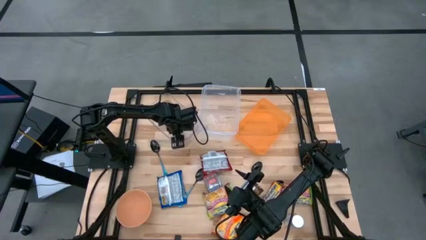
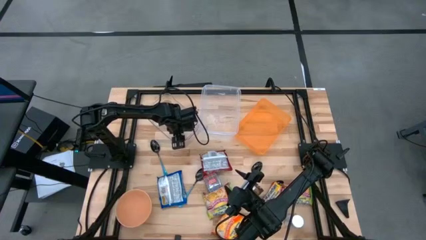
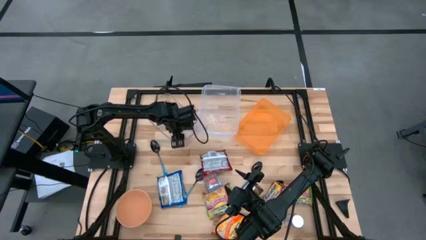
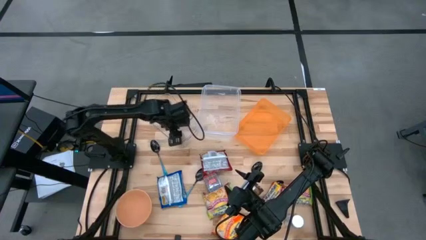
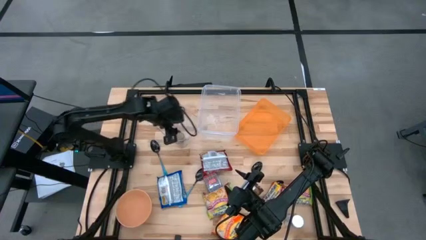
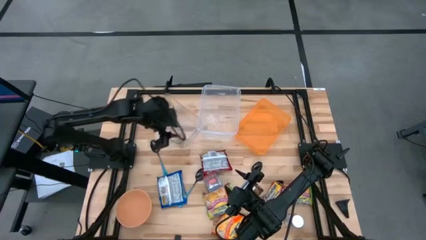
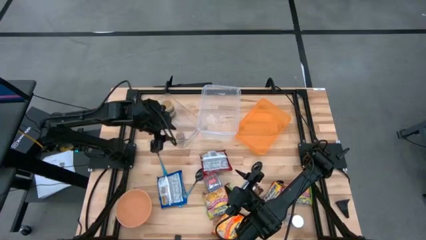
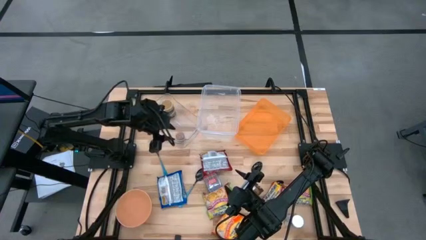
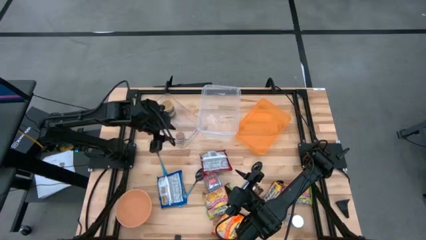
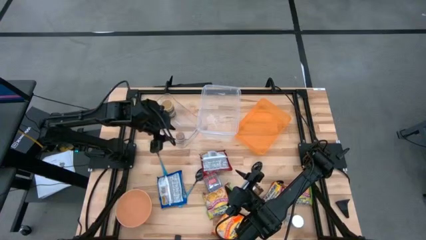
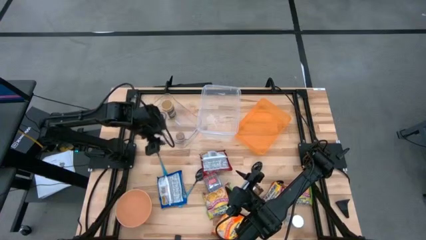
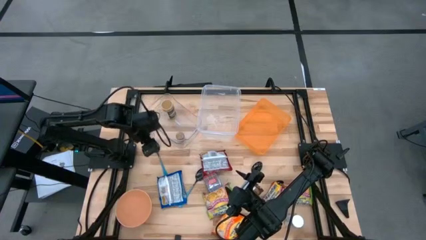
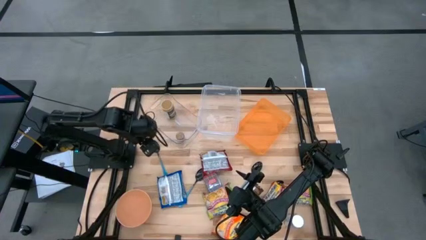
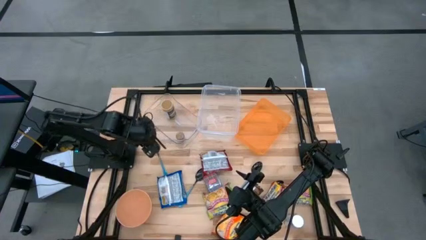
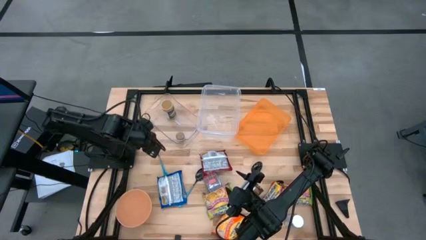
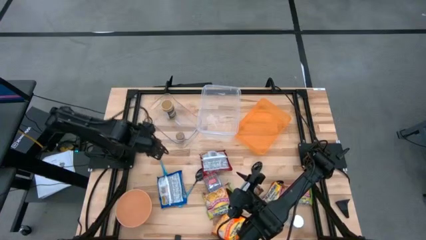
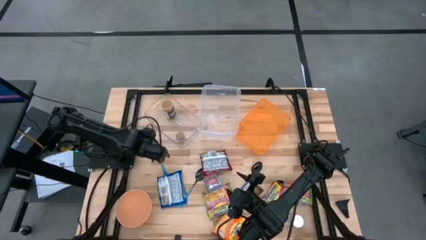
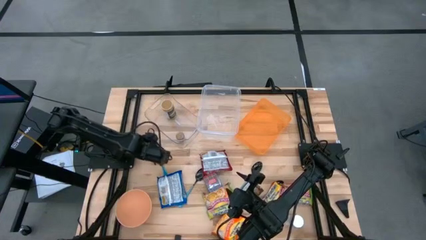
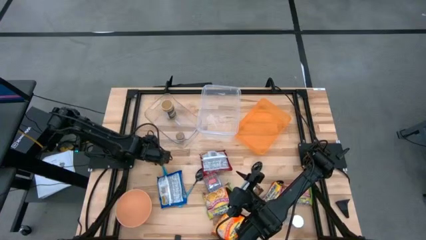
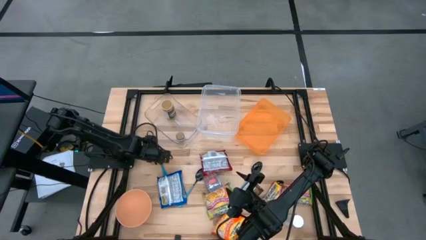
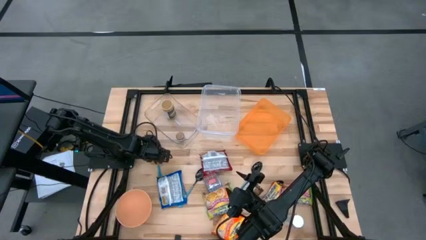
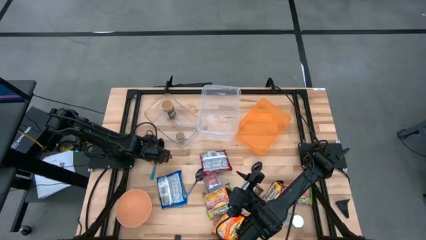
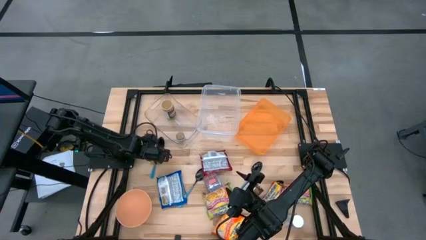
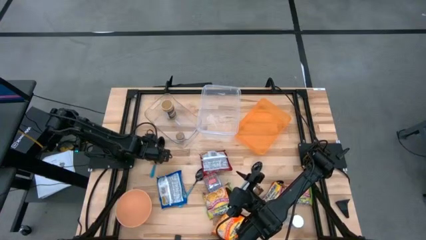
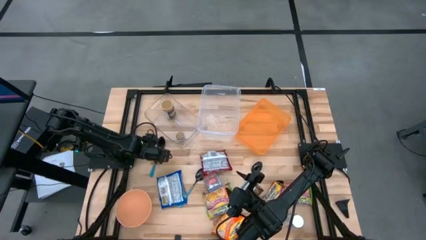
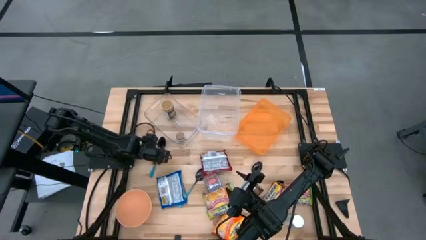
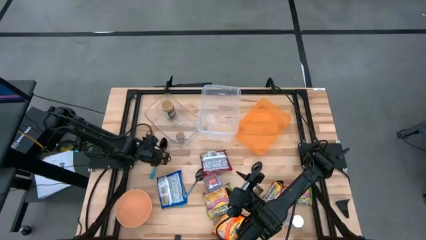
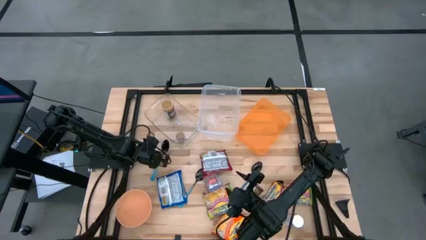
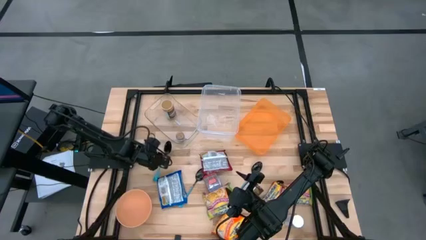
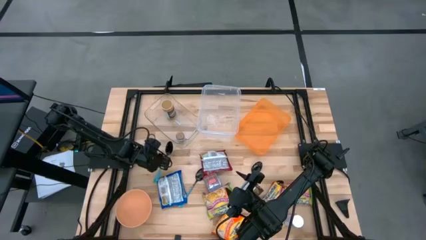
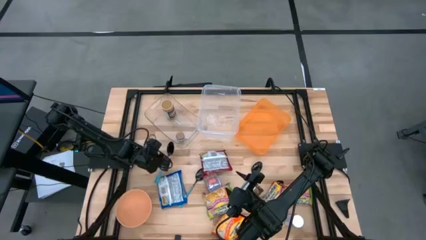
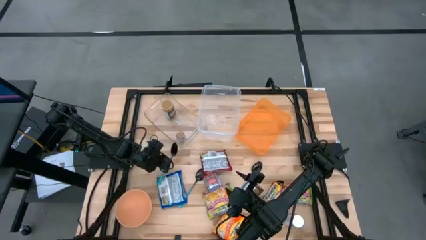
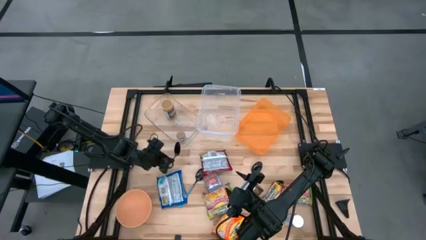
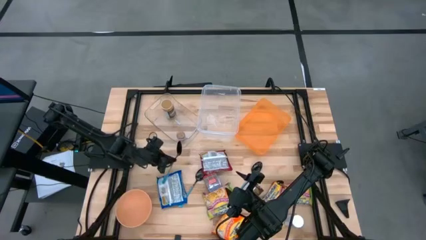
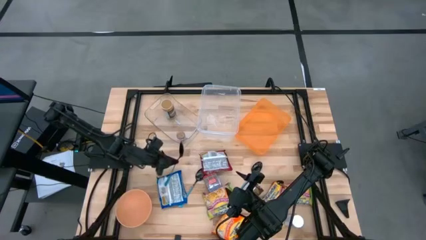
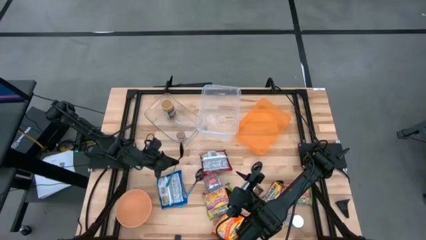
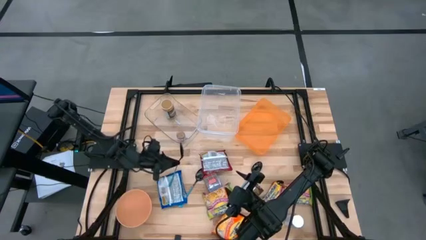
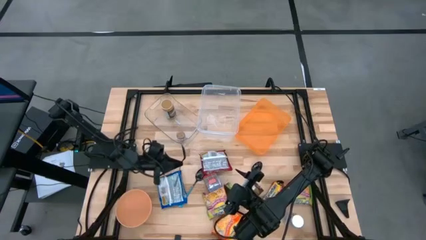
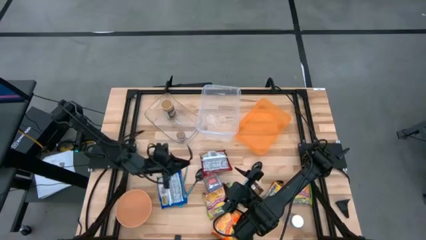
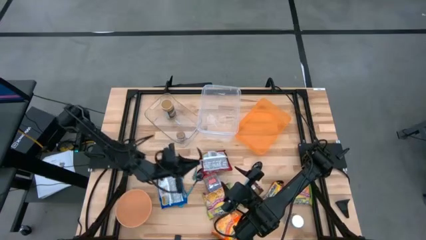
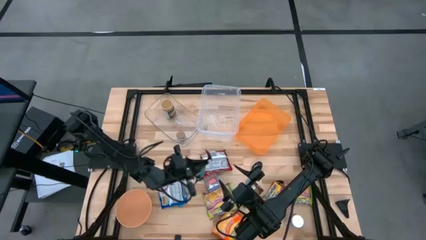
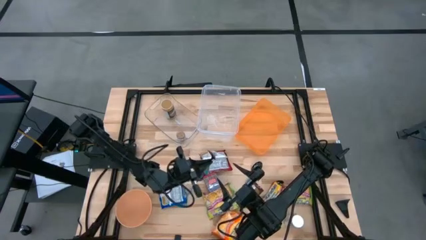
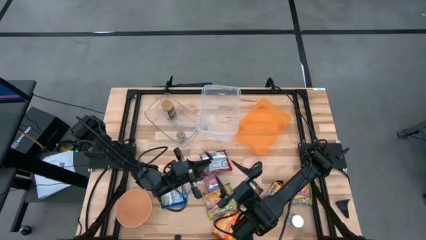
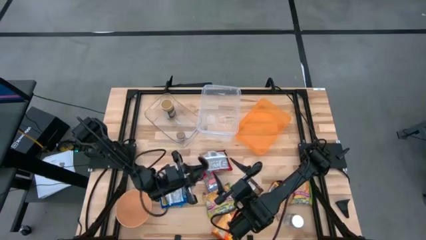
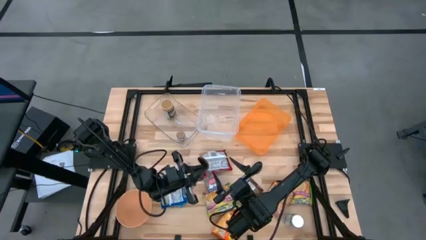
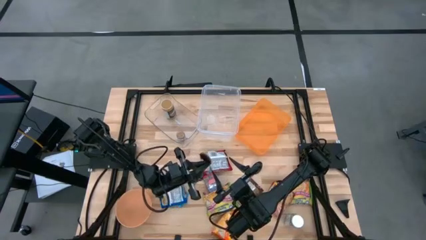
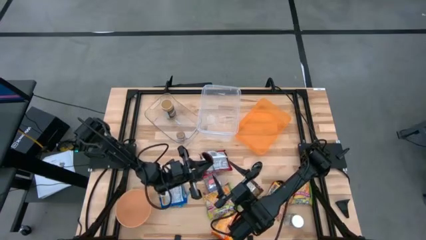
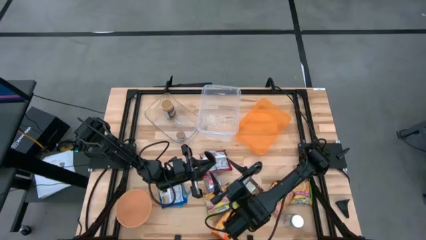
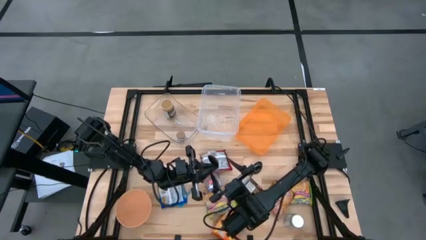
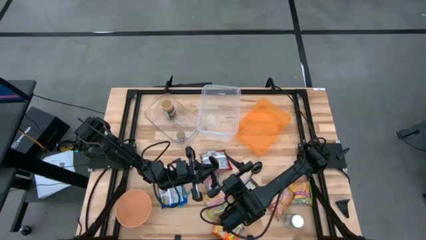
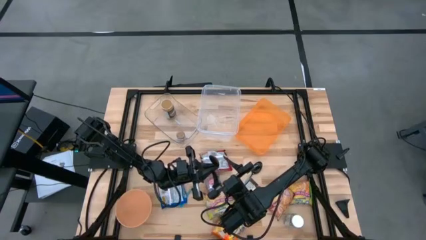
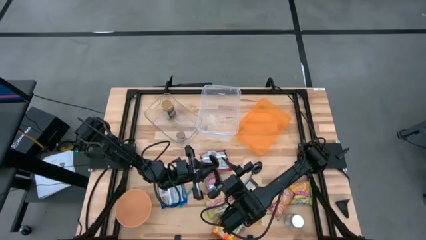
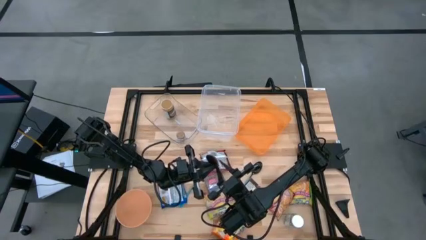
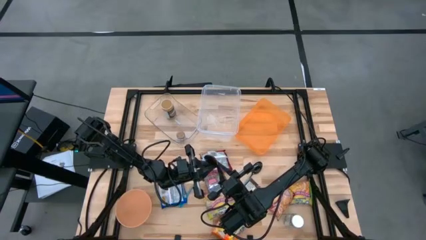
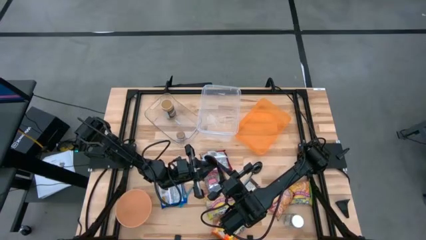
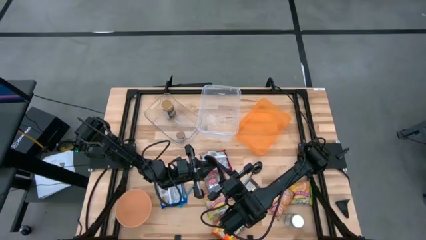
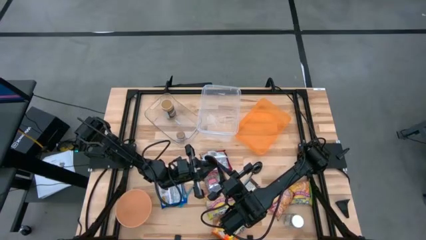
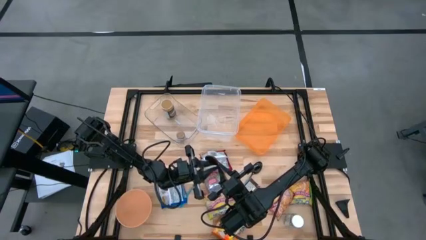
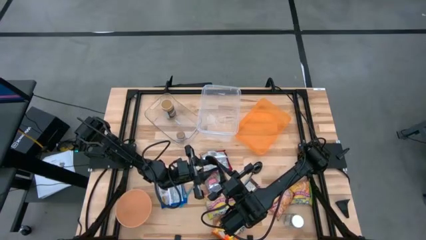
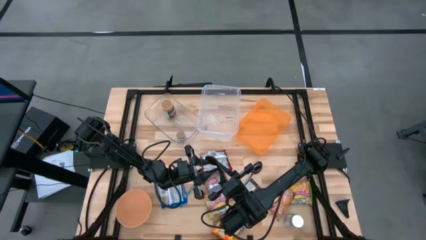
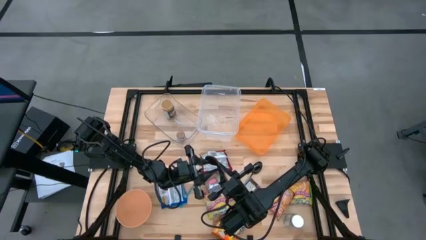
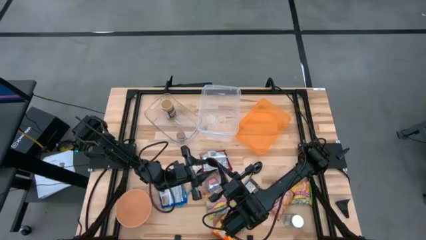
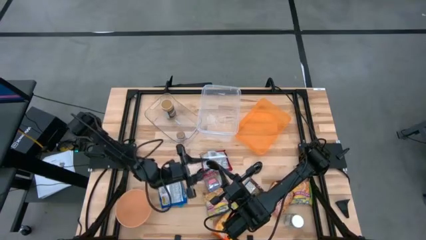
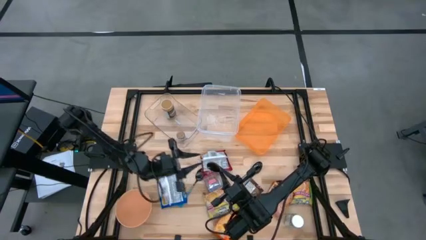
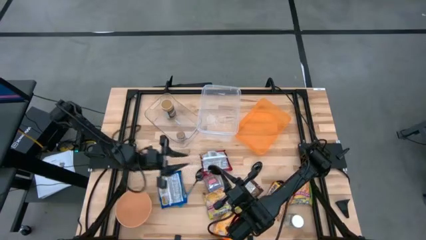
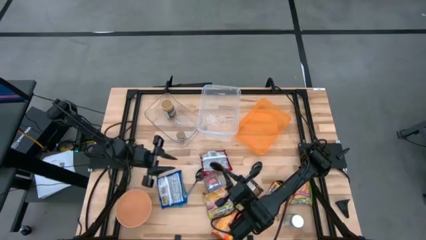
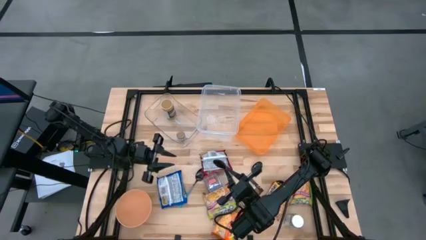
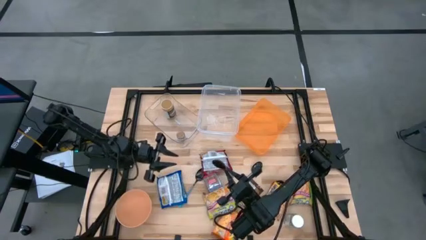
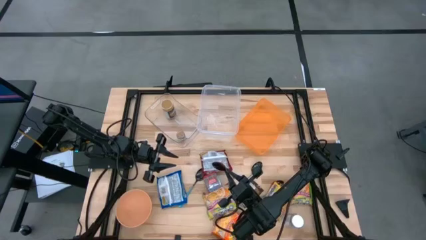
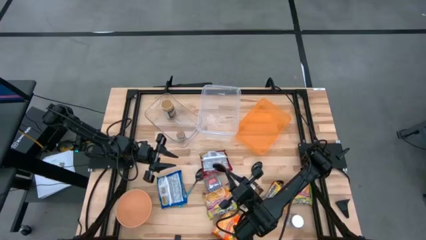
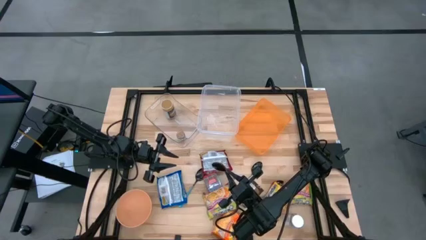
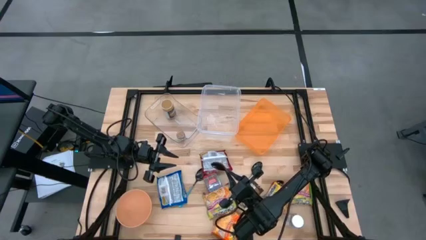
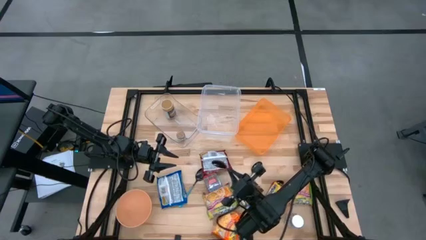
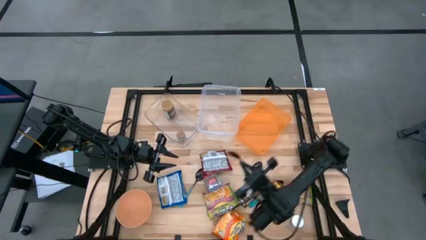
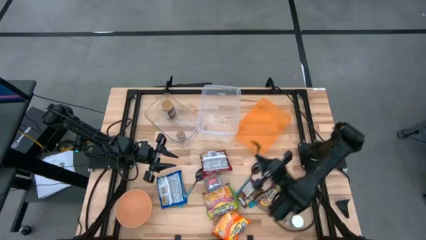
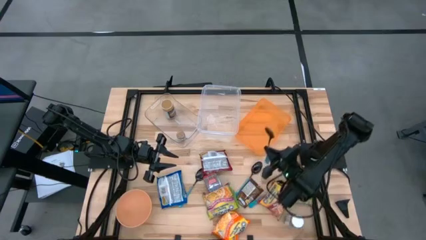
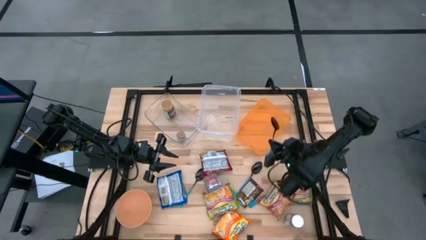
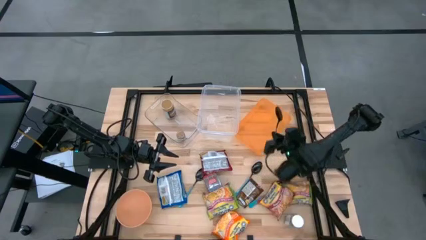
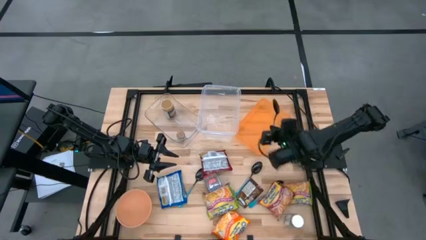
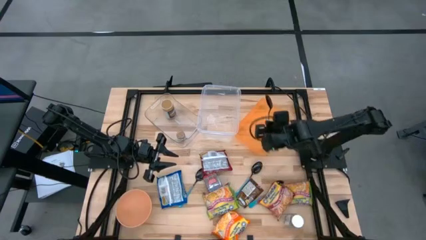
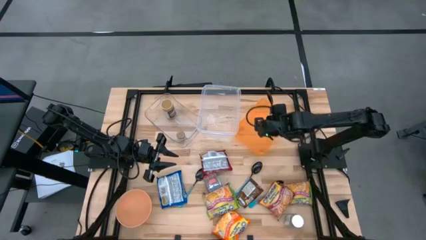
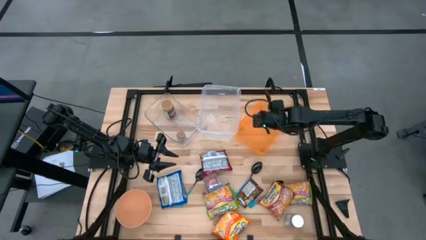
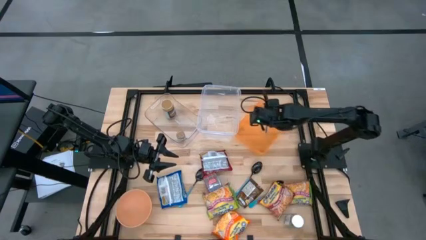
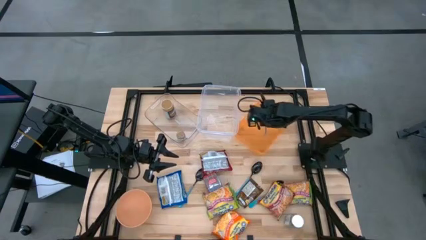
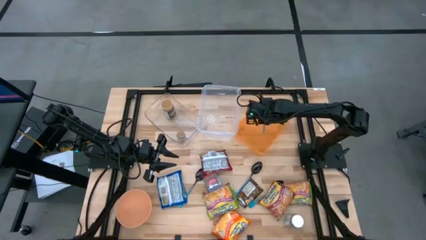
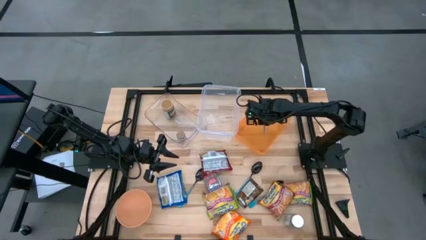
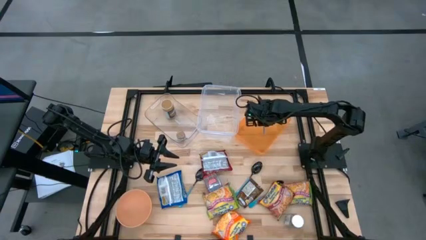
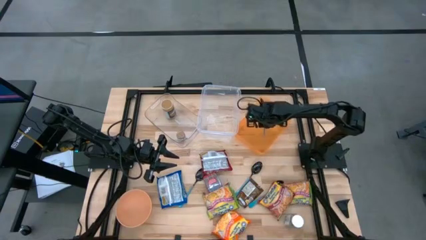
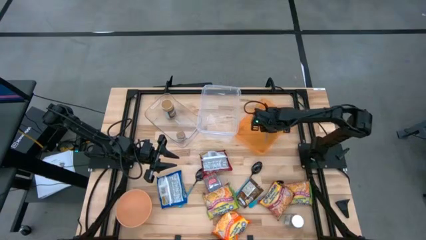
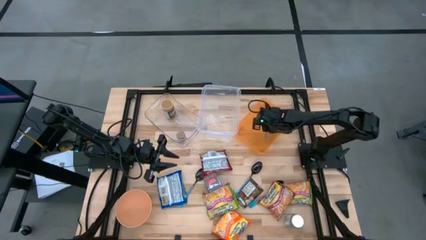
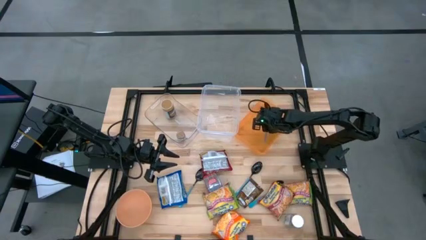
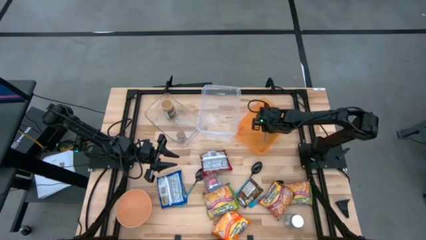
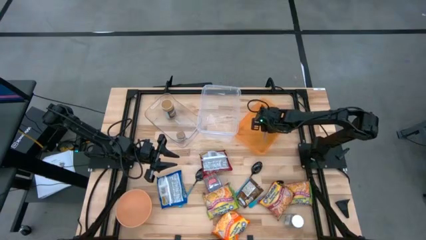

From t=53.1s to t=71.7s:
Task: Pick & Place Food Item
Put the blue spoon into the orange bin
